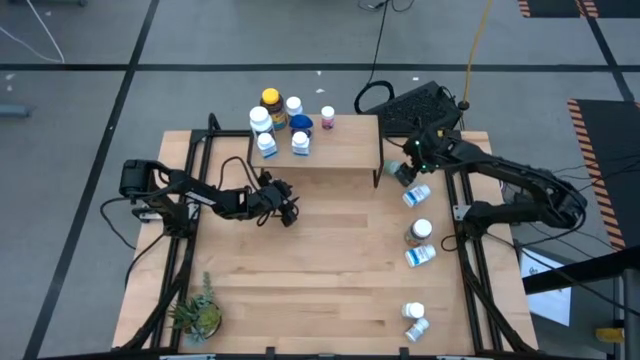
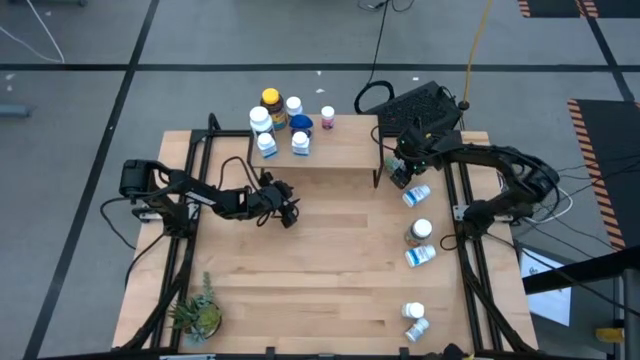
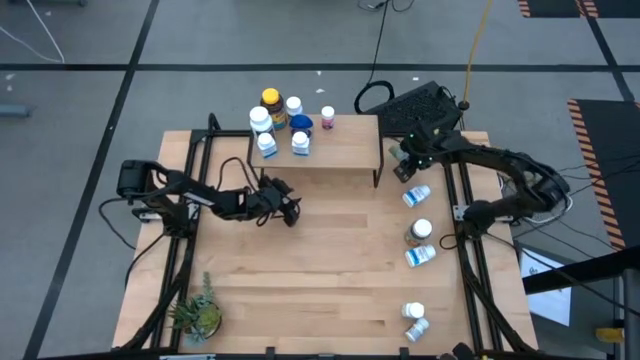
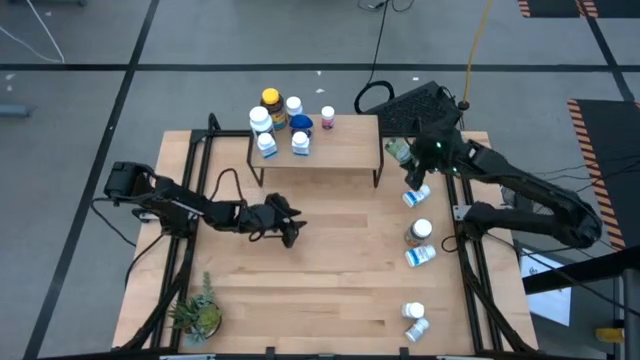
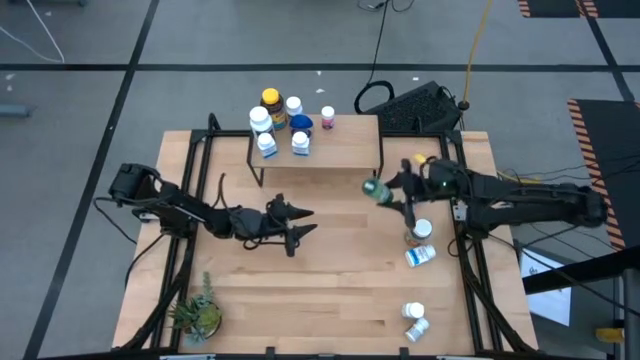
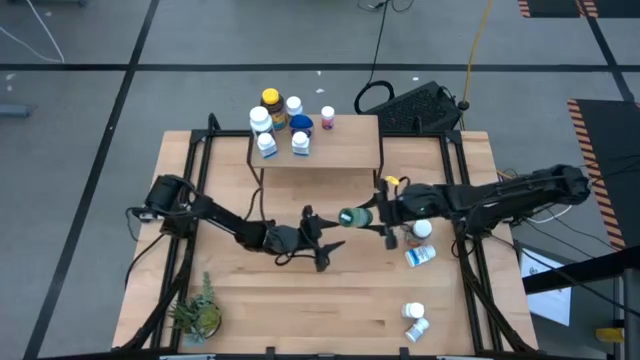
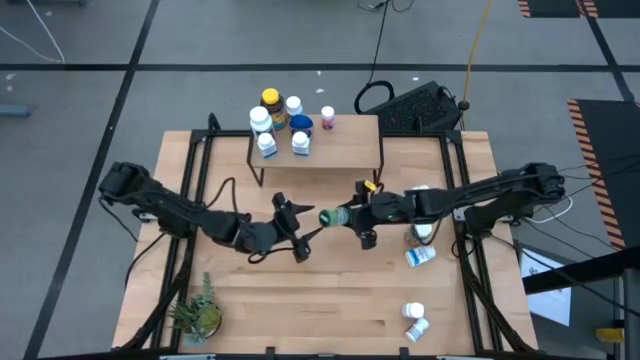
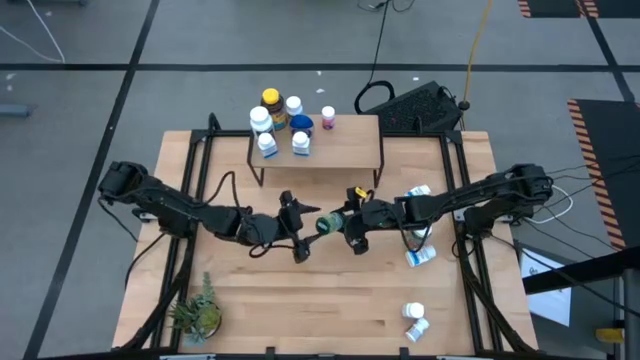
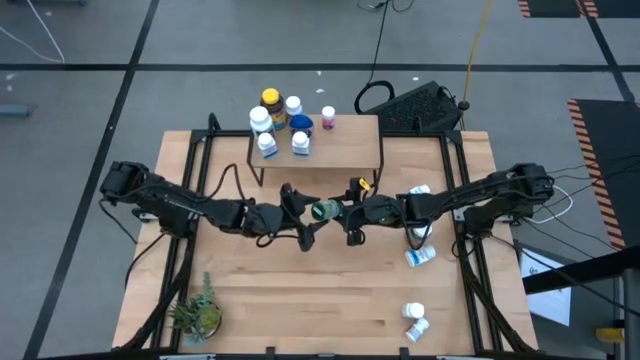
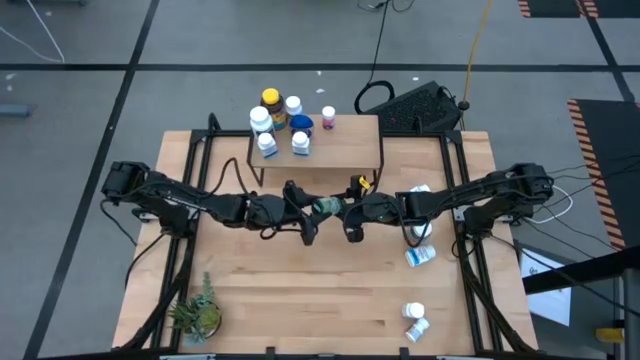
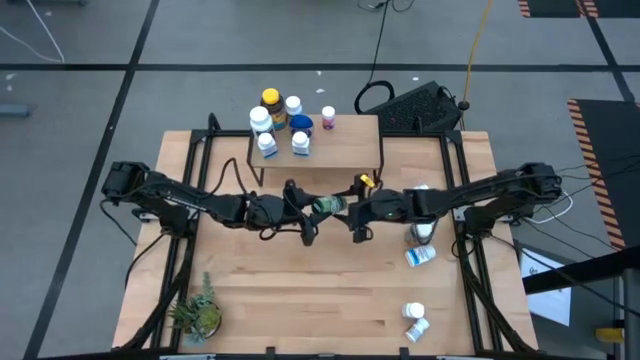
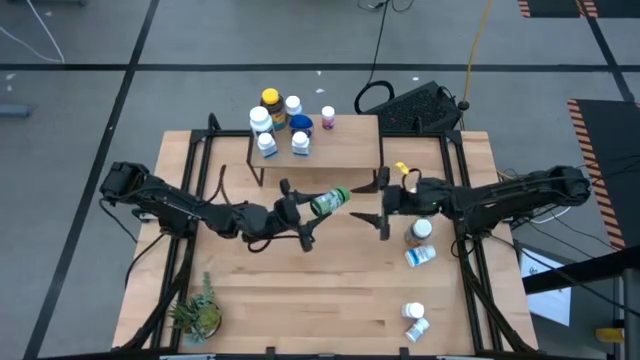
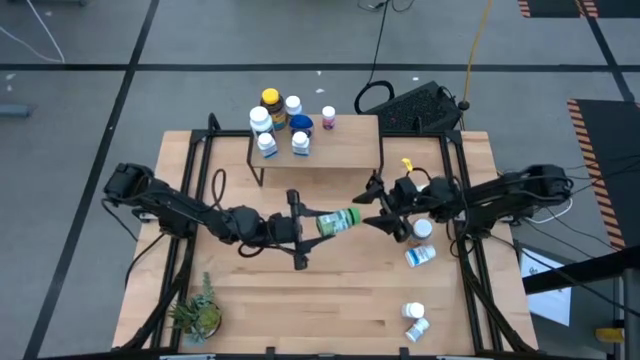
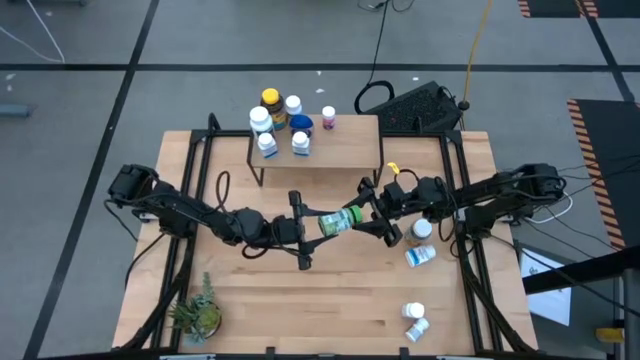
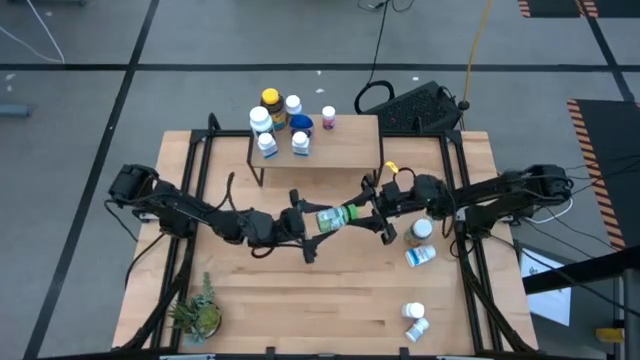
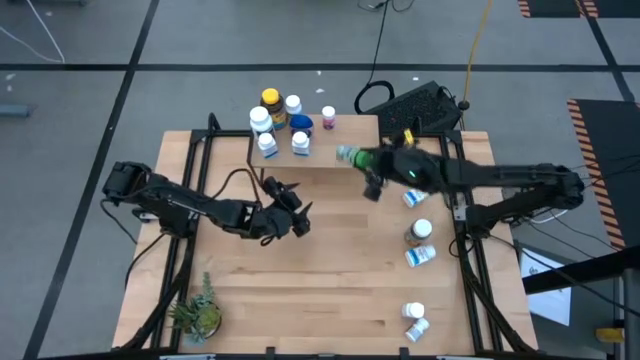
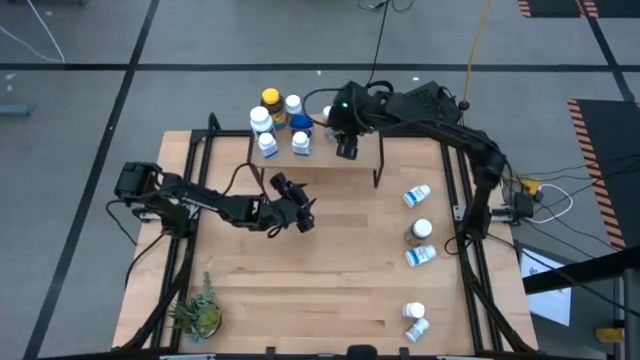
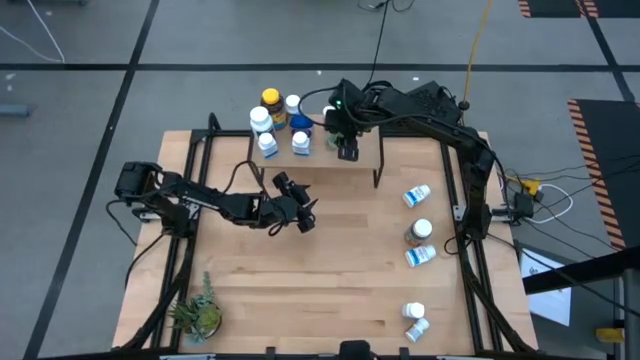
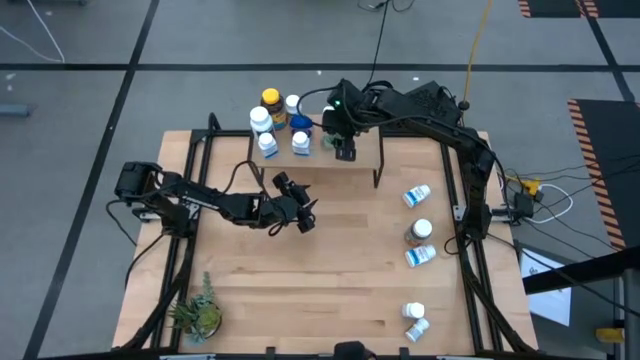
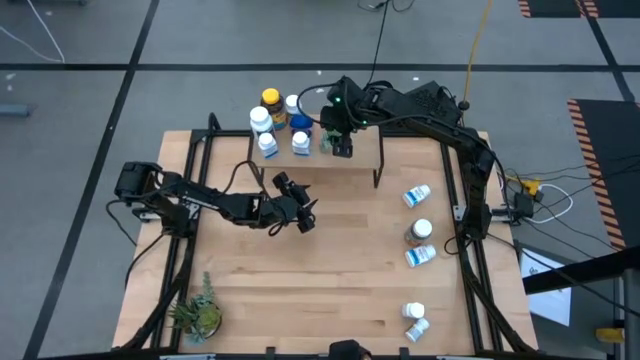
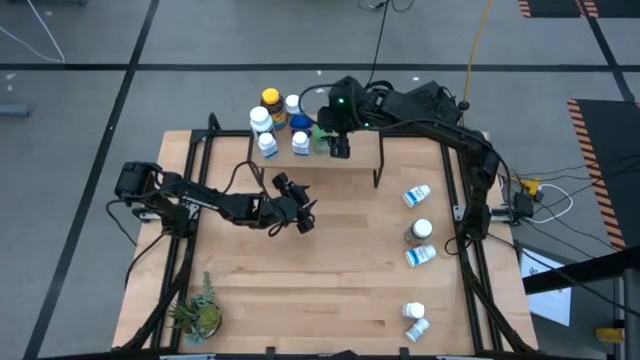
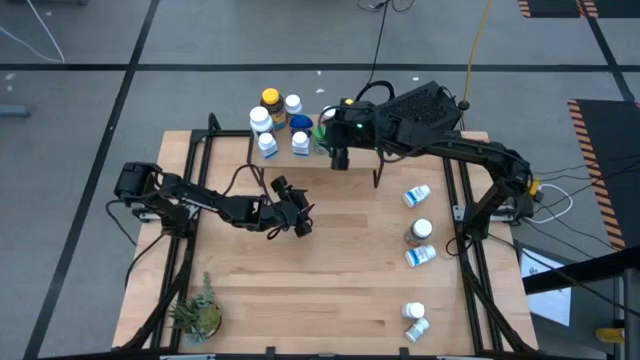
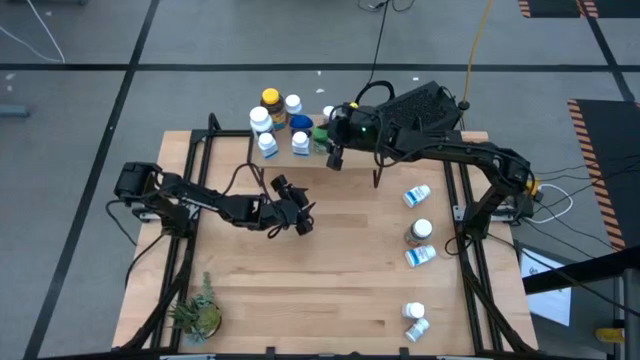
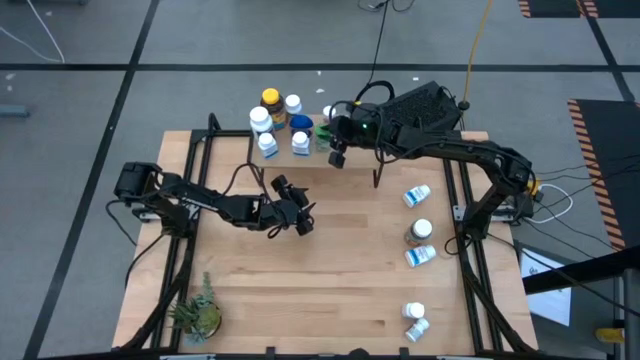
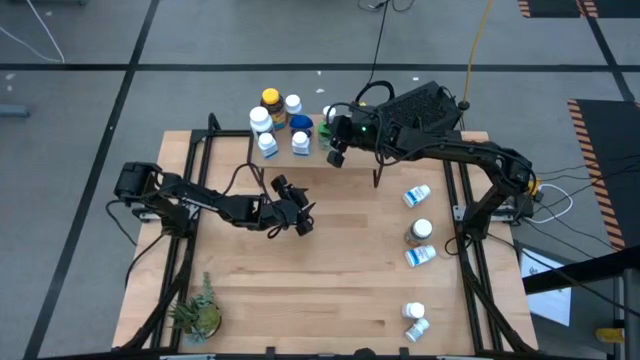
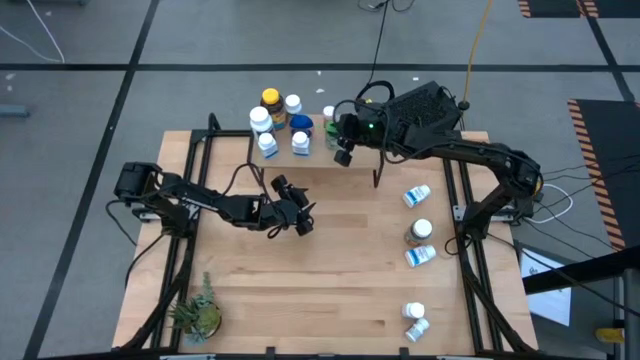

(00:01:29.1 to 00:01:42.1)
Task: Pick and place medicine bottles onto shelf by color
Put the green medicine bottle on the shelf

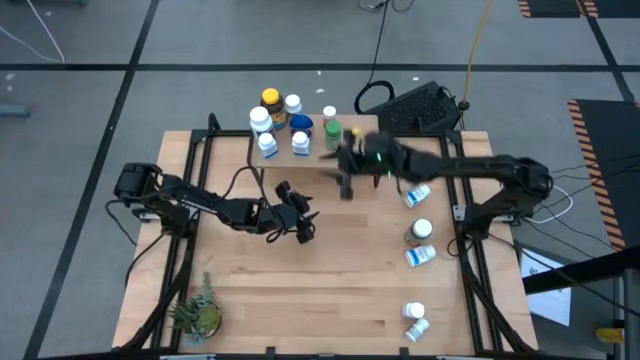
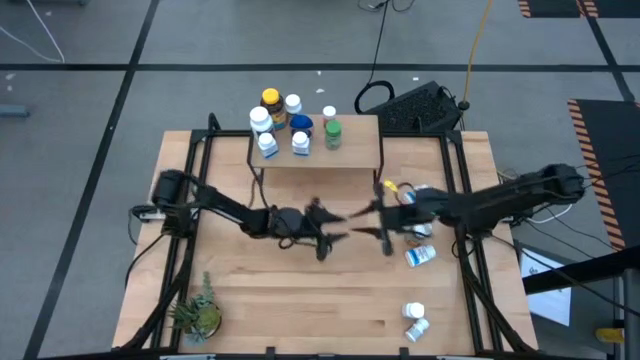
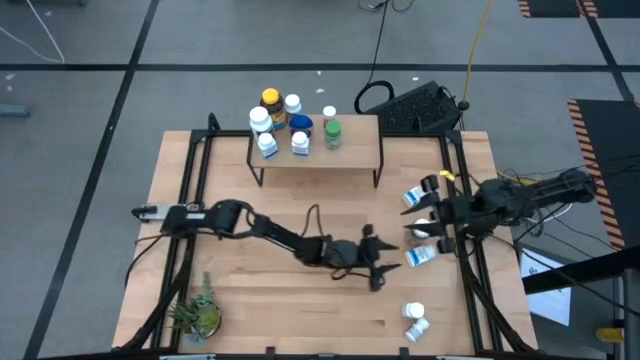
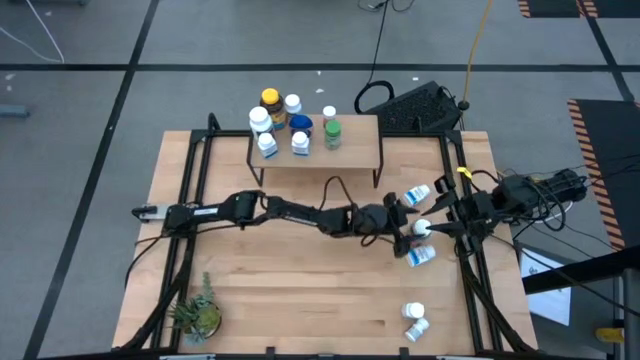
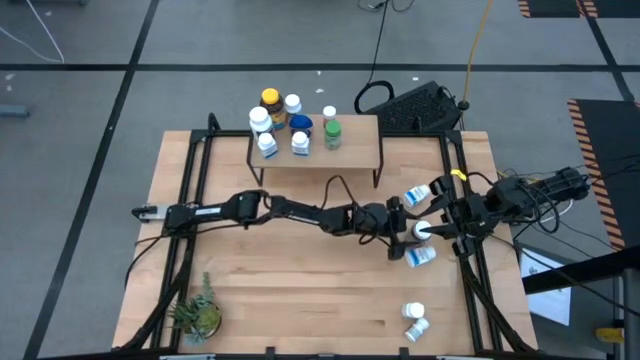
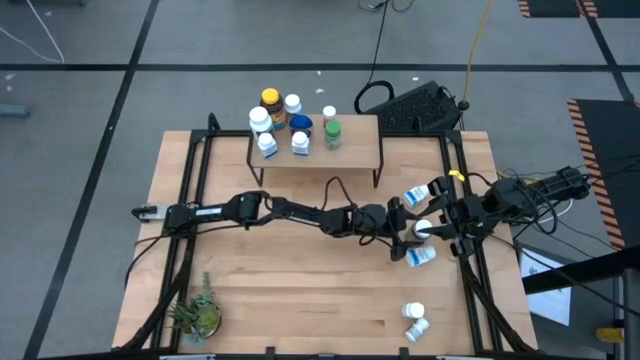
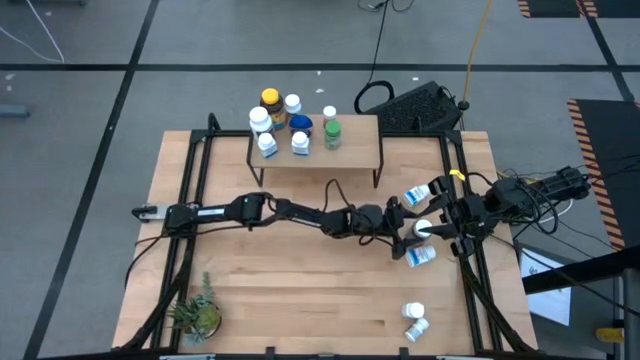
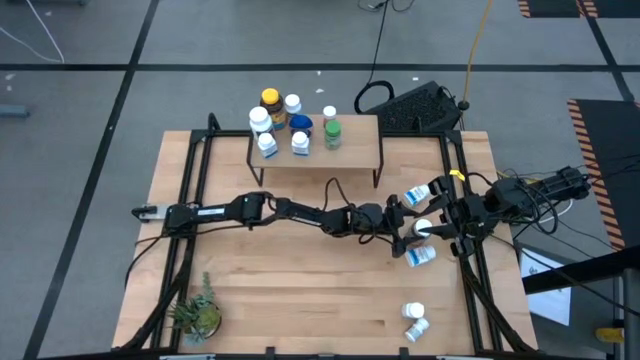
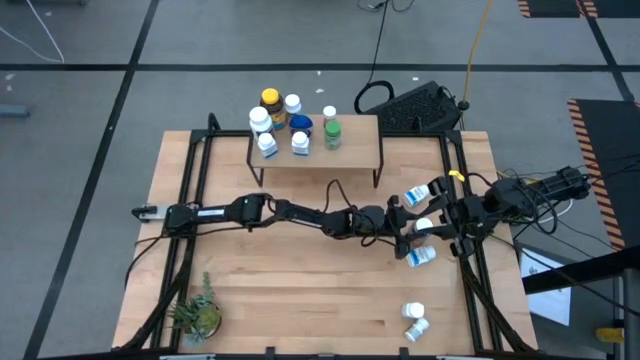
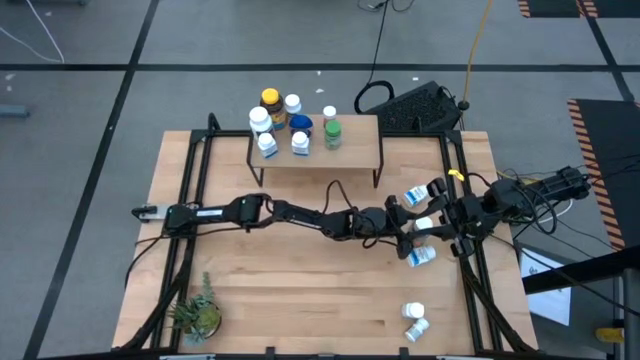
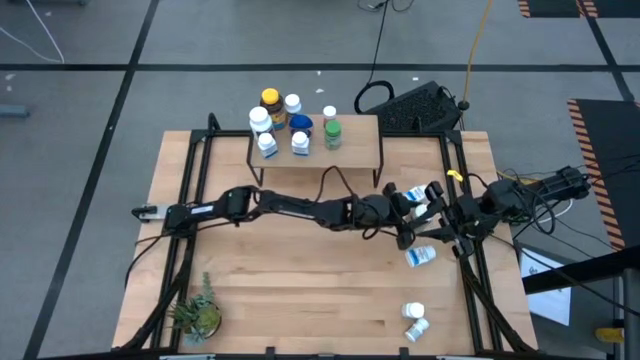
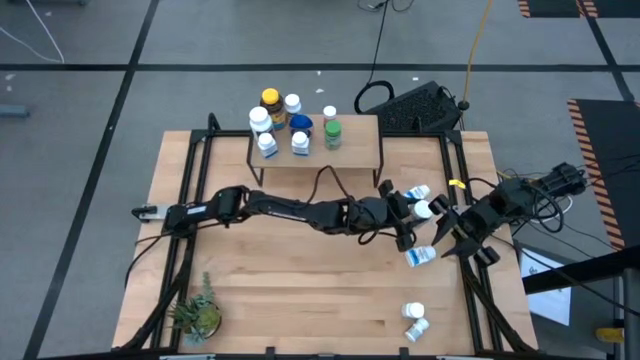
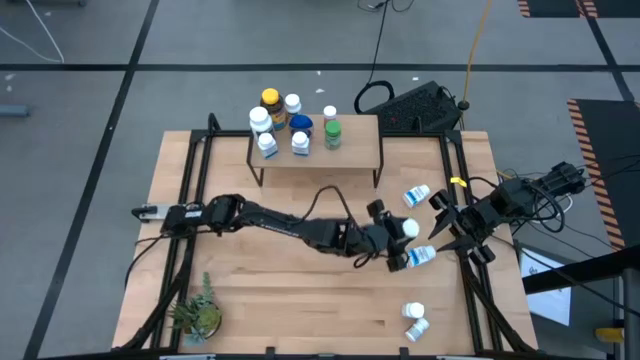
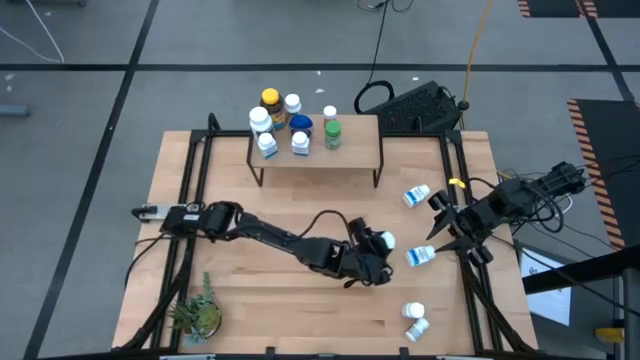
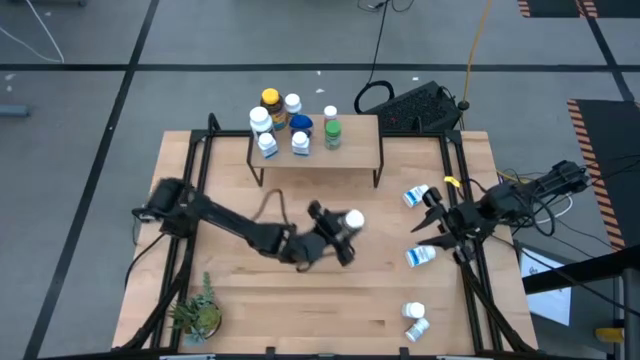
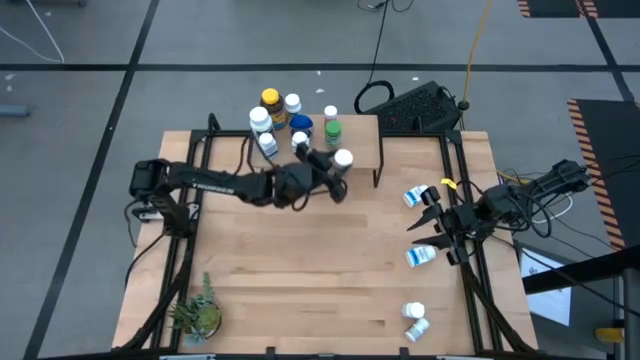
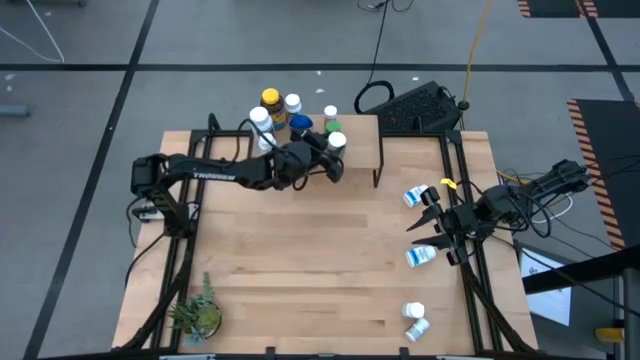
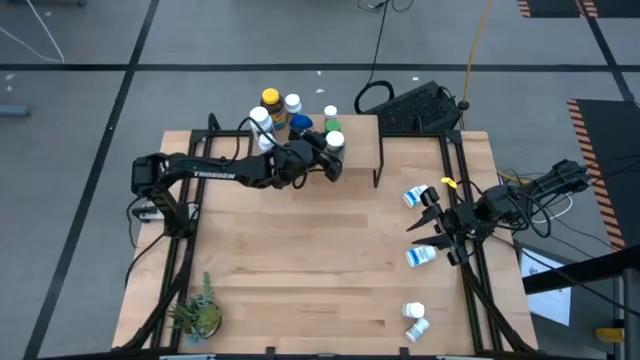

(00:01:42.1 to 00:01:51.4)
Put the dark green medicine bottle on the shelf
